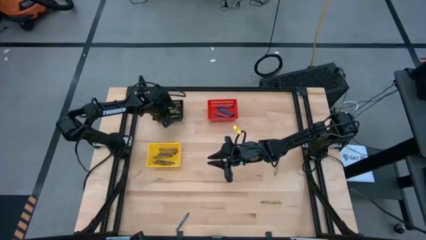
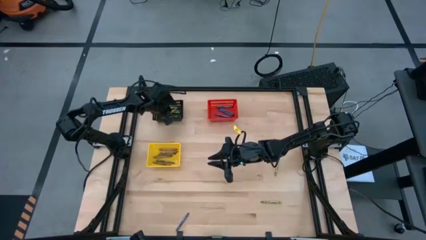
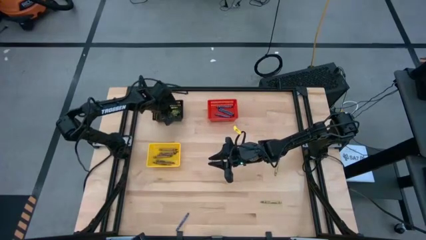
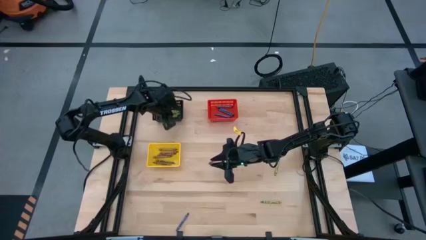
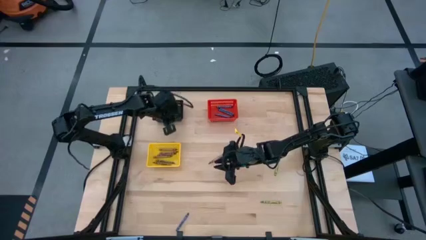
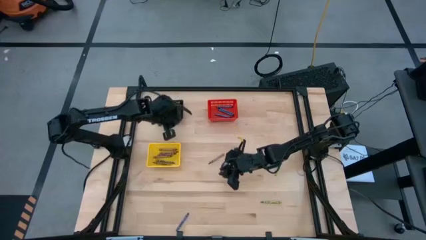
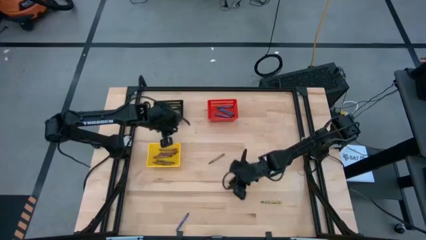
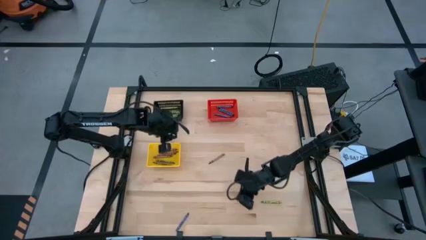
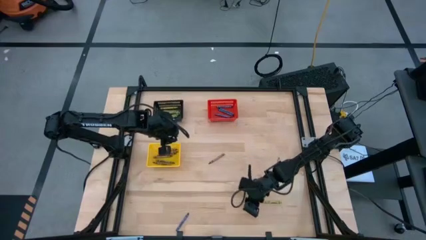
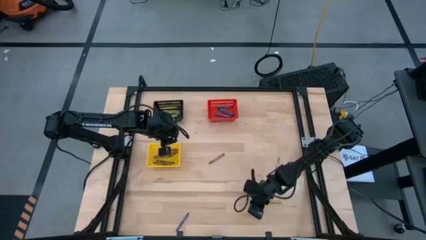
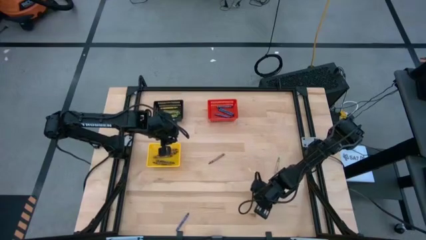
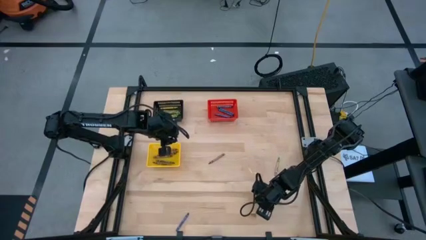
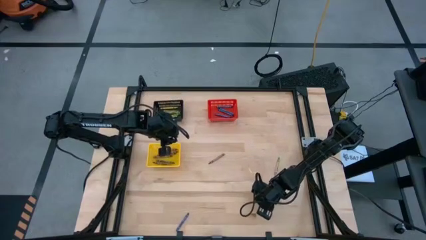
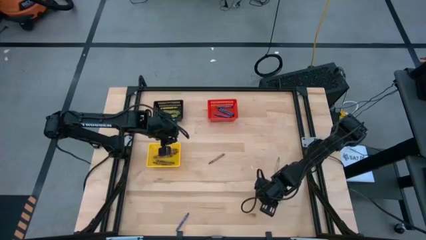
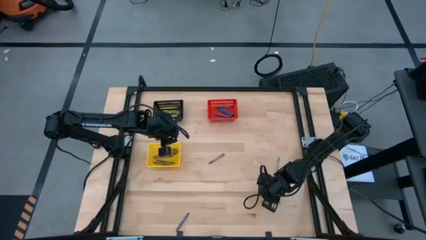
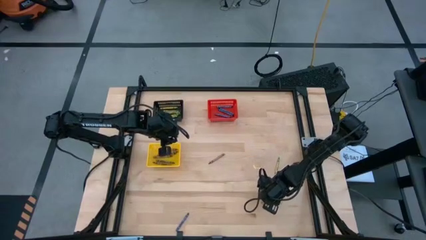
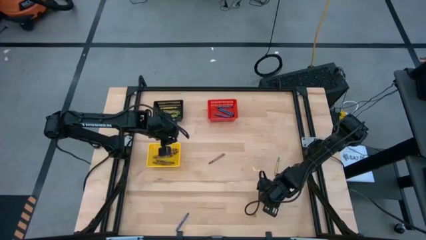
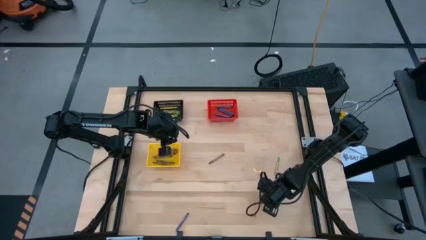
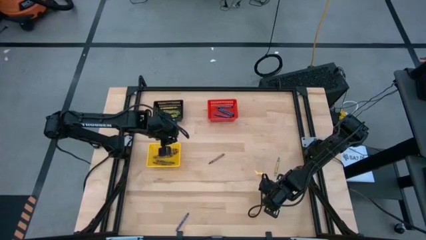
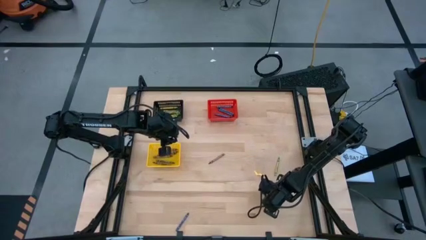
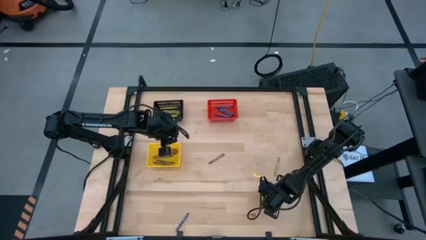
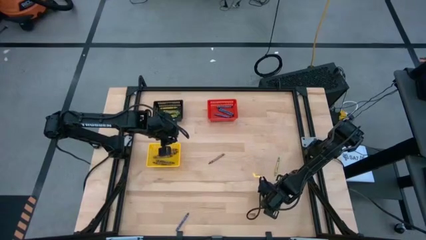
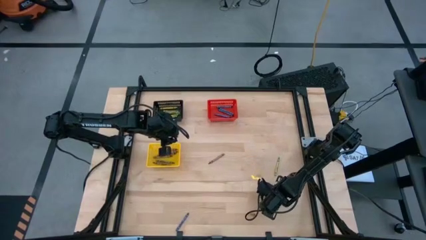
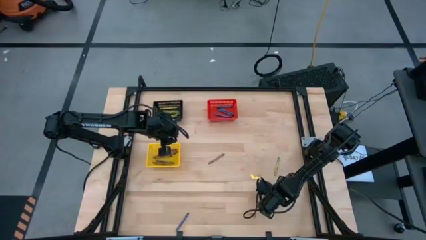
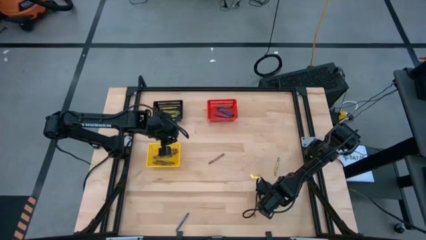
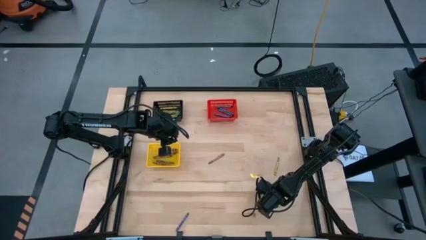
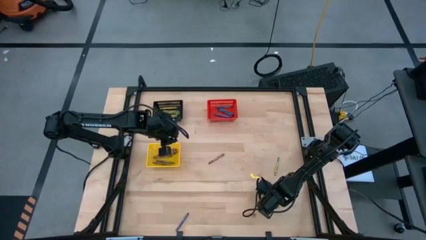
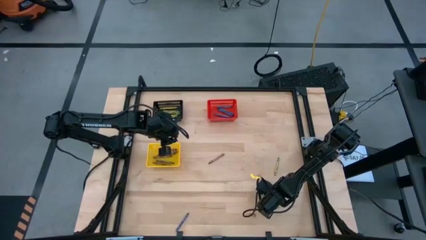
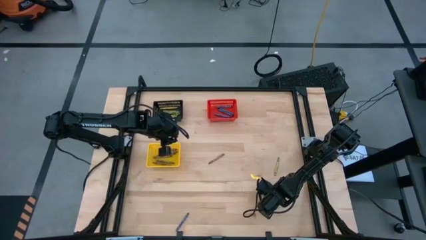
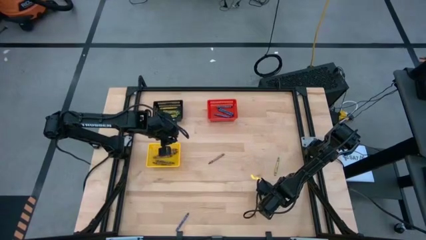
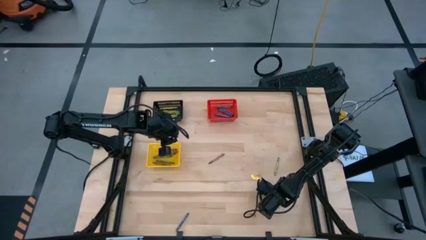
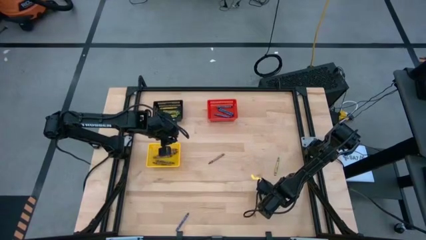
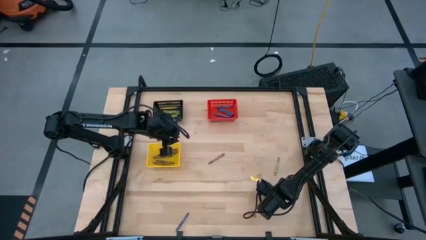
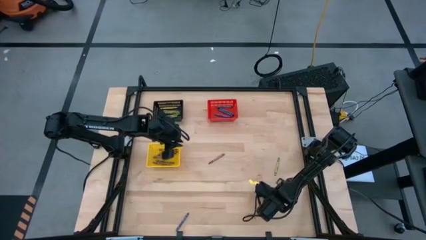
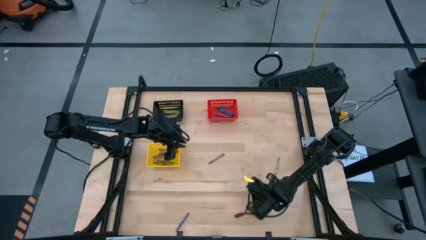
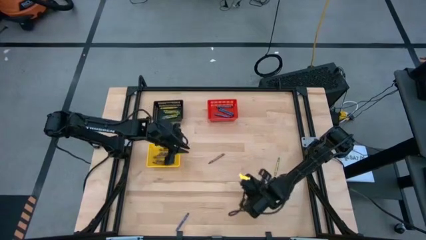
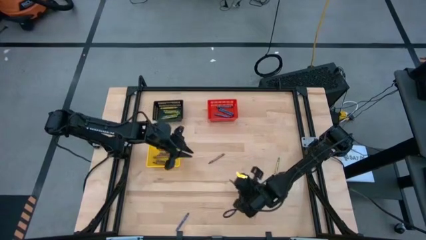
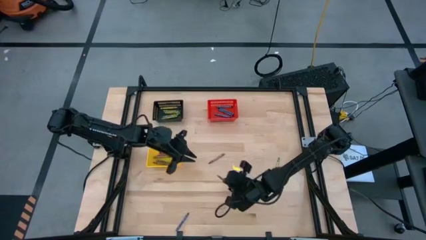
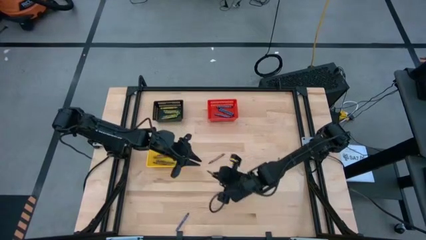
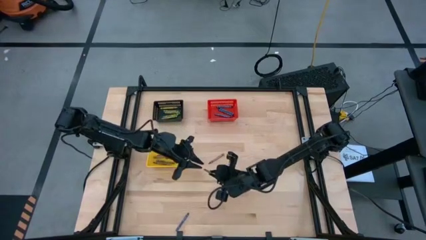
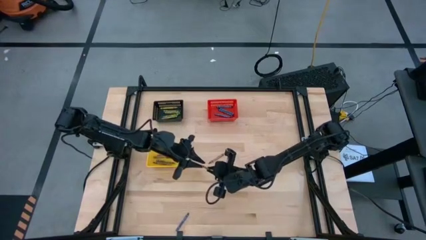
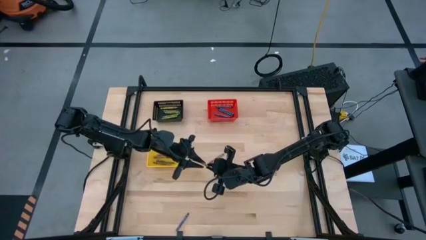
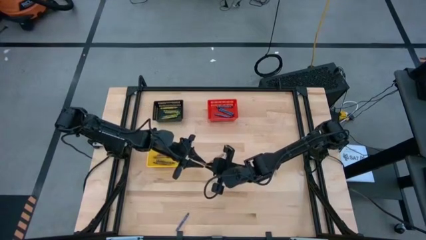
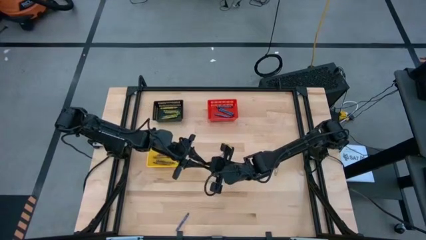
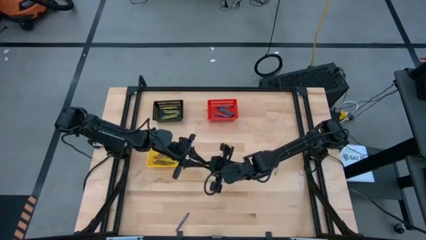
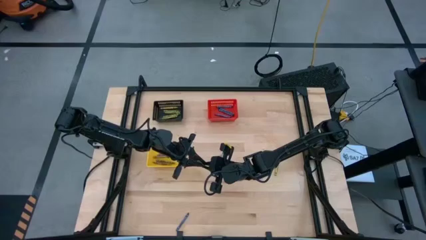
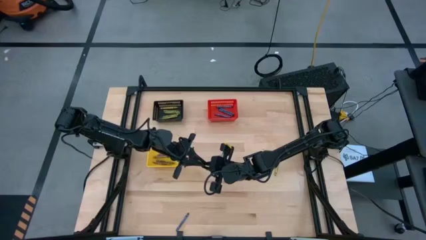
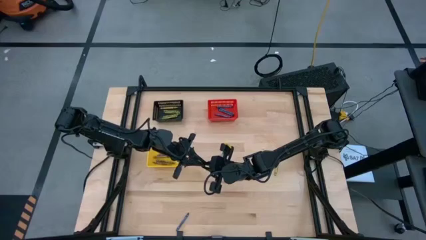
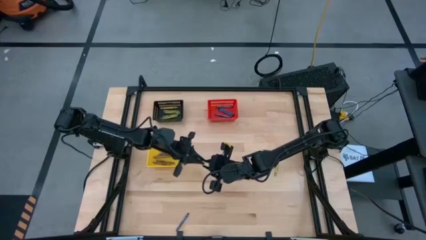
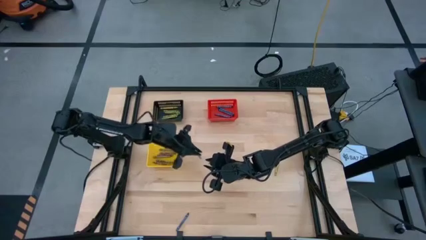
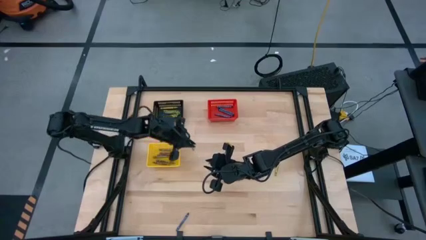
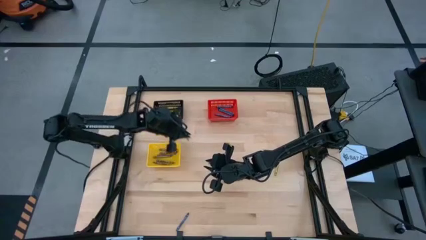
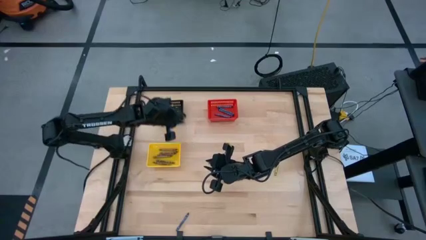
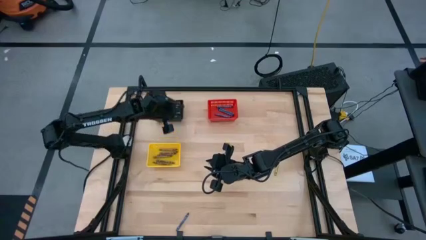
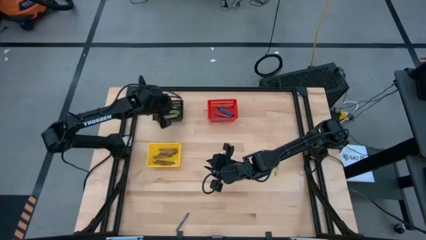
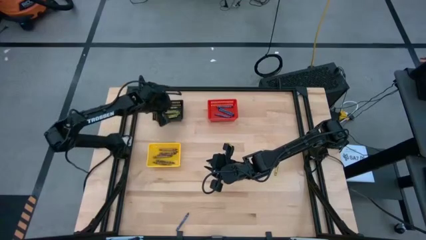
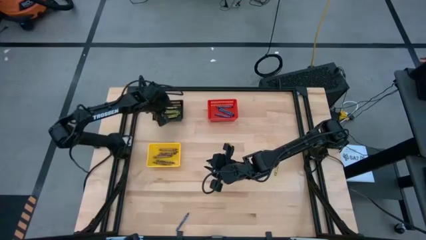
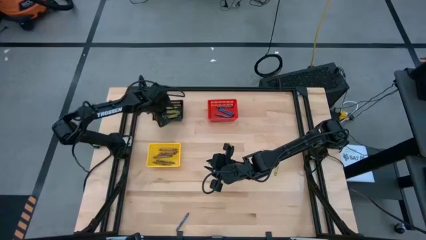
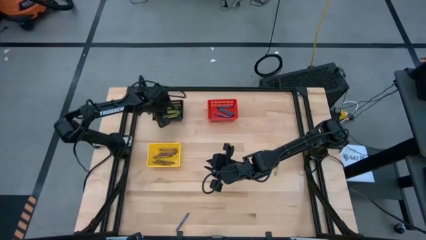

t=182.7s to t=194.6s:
Task: Sort crayons
Put the green crayon into the black basket

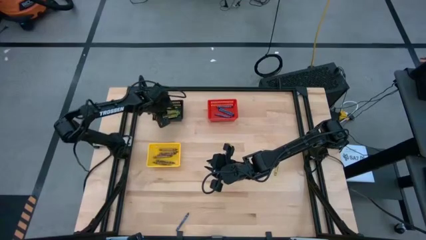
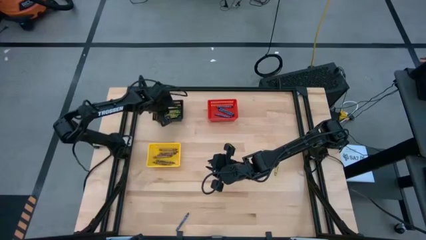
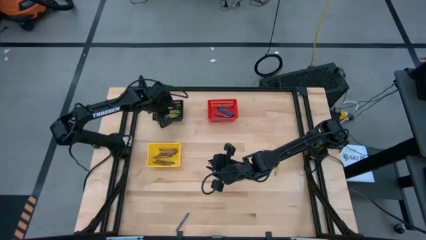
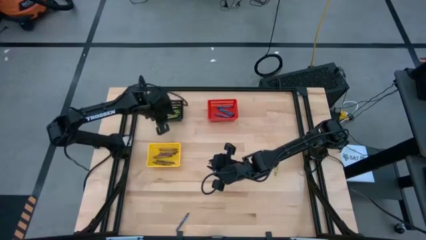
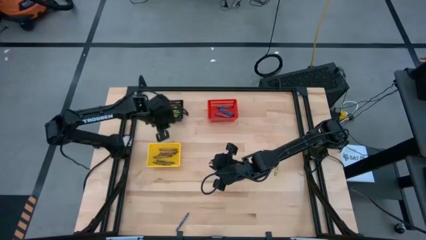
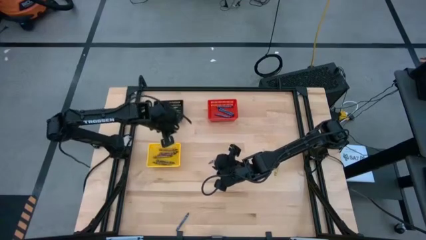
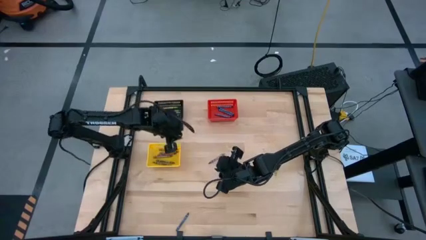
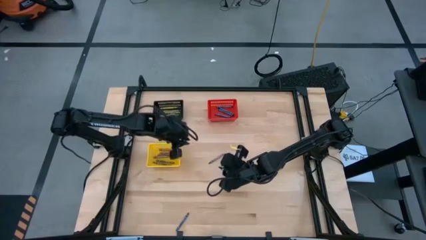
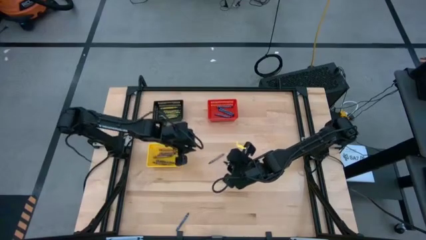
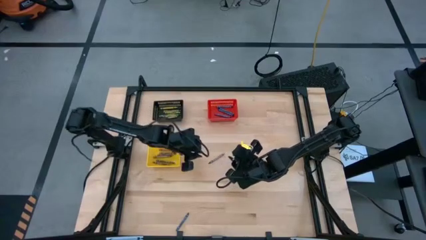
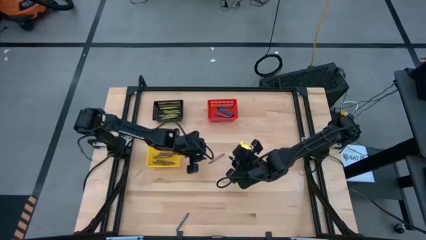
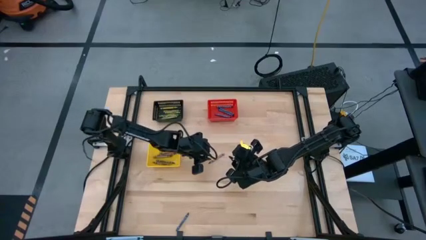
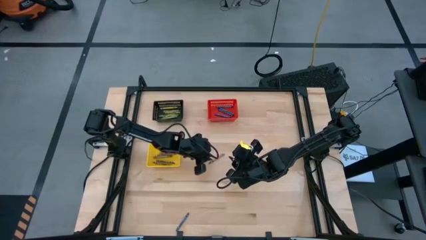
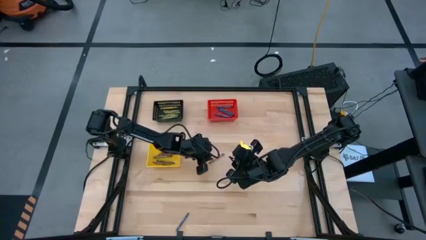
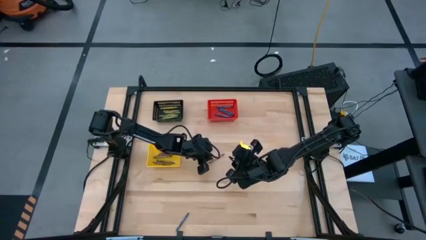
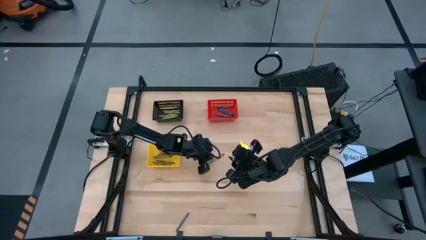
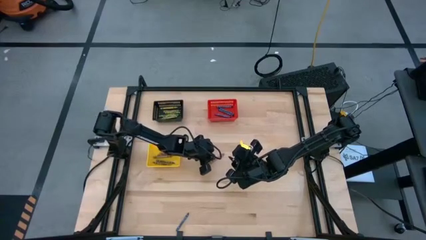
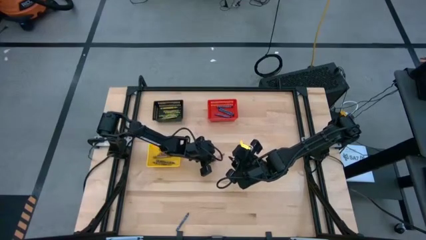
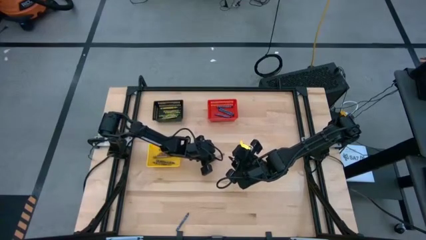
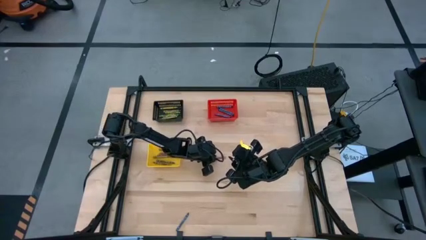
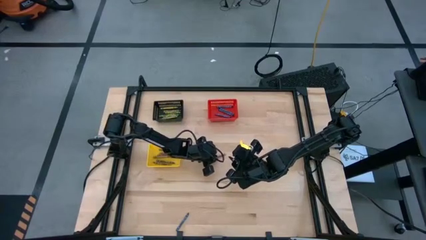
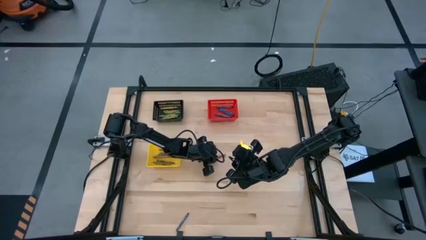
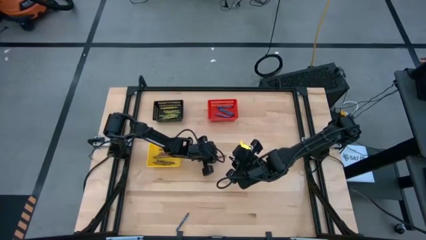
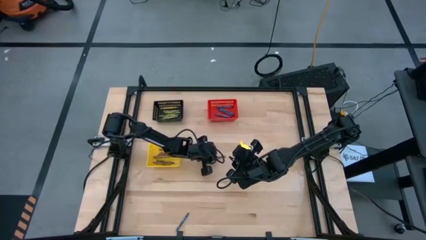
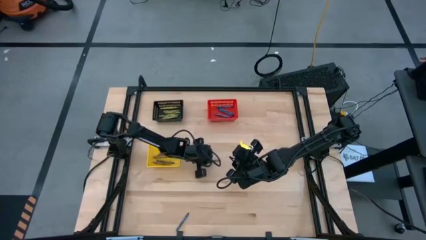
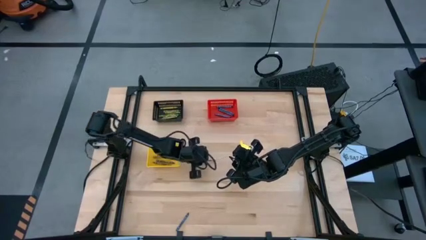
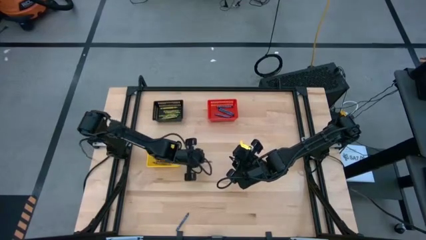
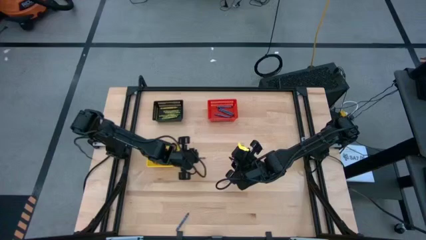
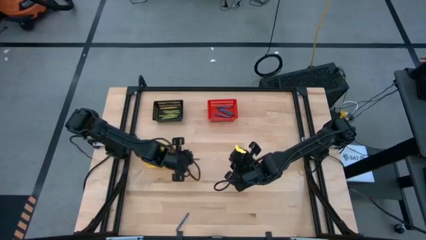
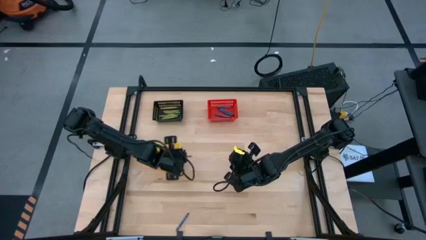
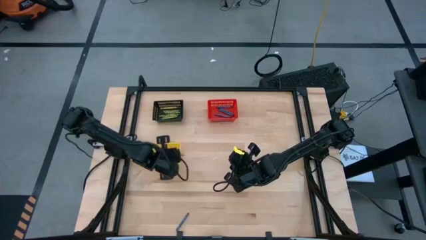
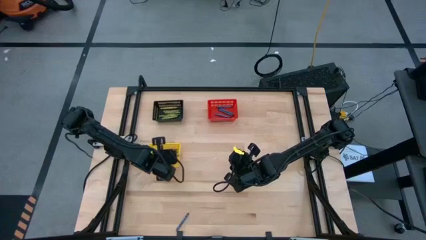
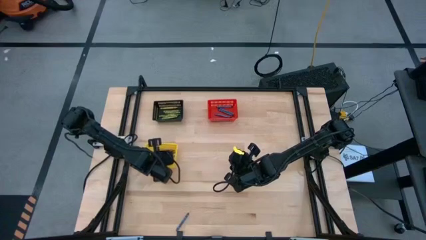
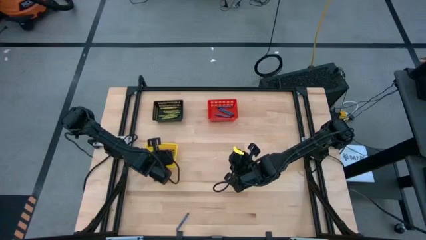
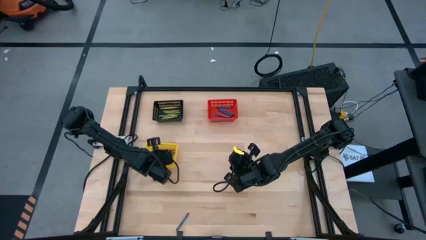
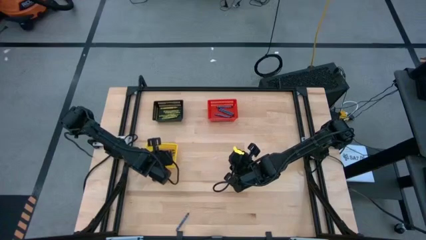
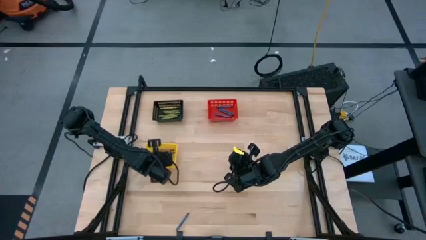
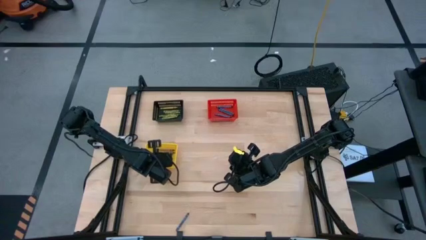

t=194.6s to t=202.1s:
Put the brown crayon into the yellow basket
